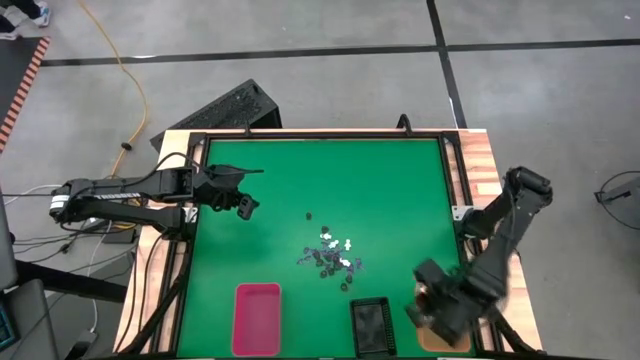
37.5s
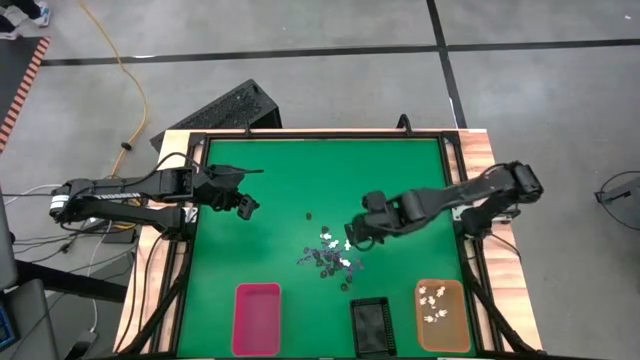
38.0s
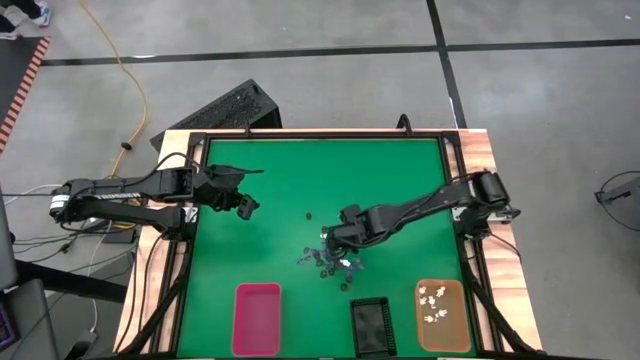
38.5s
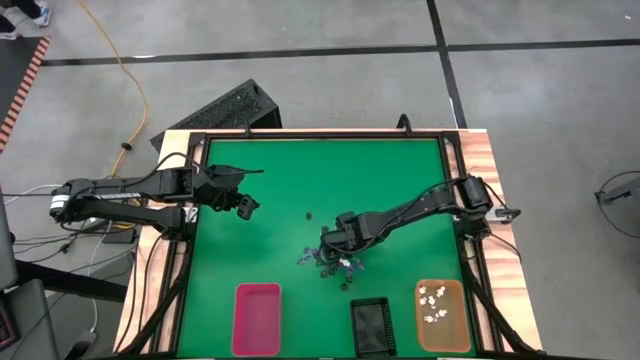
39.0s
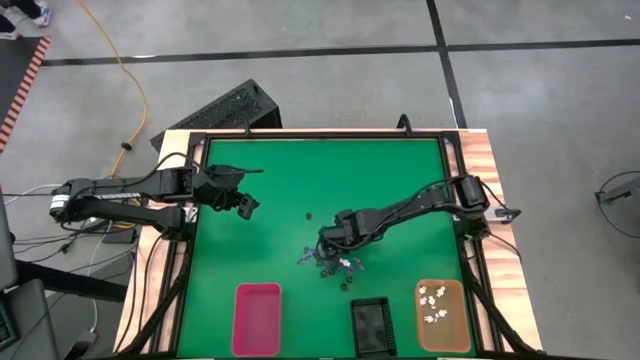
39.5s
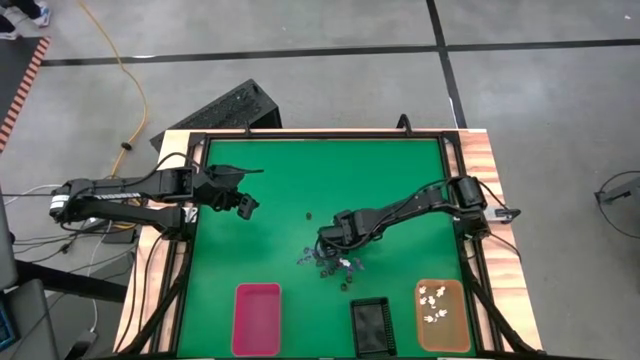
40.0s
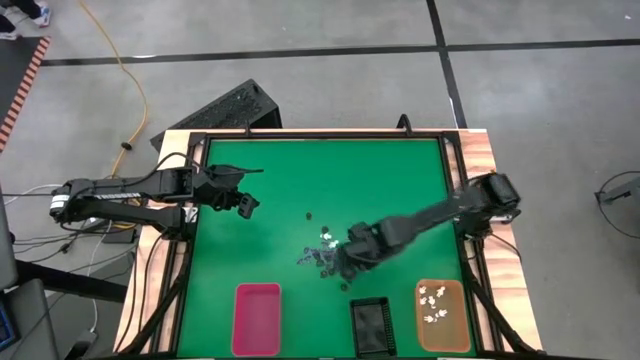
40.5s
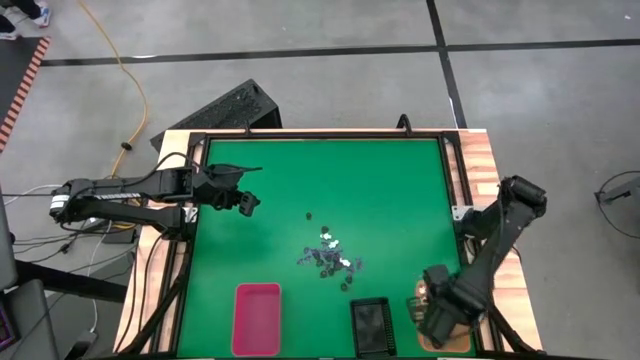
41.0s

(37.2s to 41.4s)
Task: Sort Halloween decoration
Put the white skeleton toy into the right orange organizing bin

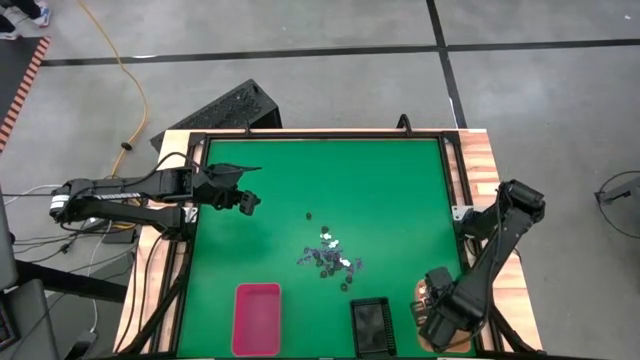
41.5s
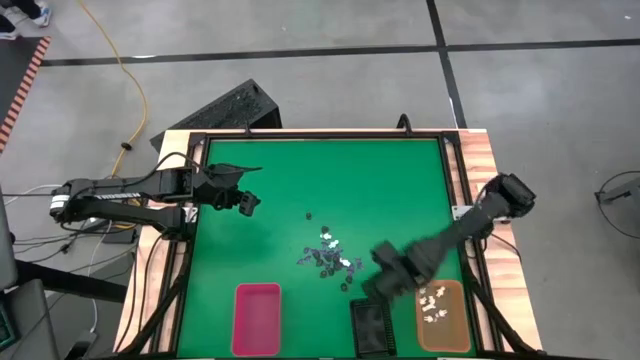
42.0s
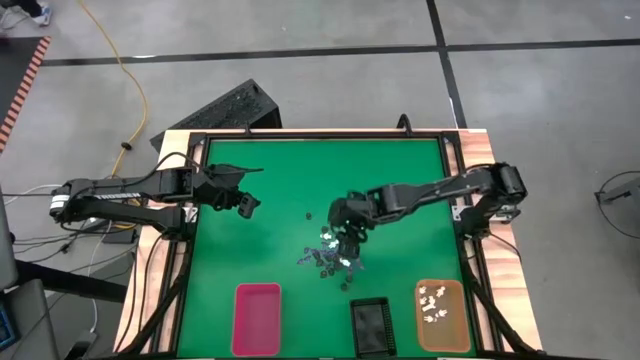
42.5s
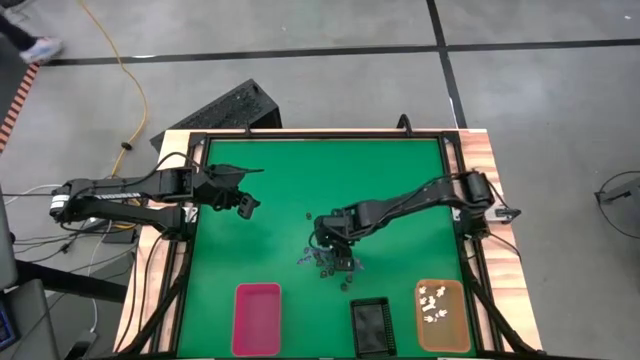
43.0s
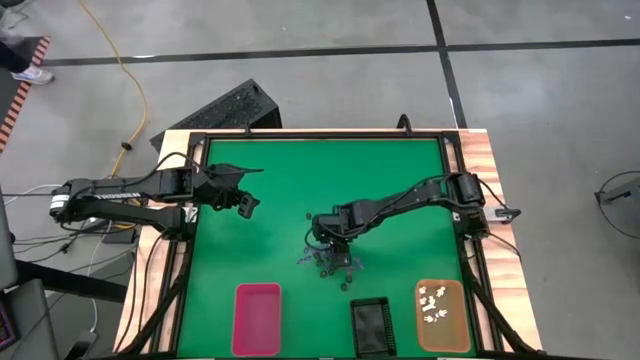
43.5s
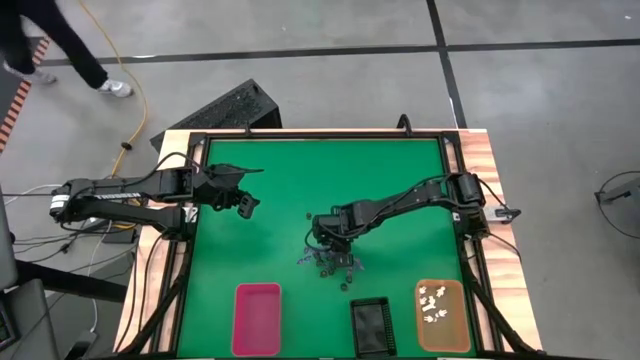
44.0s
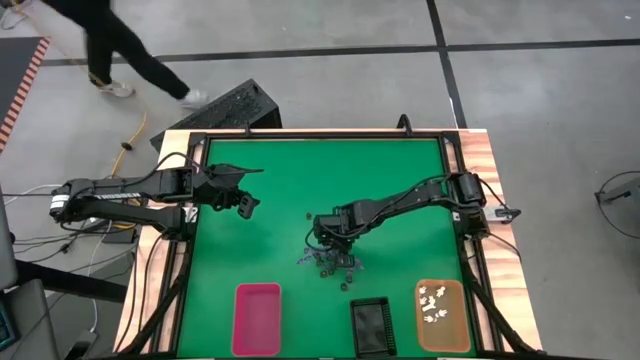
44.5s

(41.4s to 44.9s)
Put the white skeleton toy into the right orange organizing bin

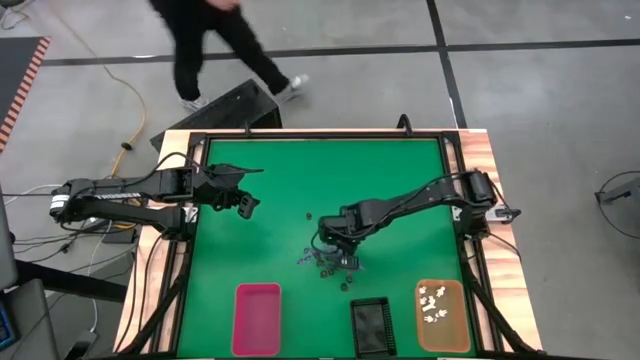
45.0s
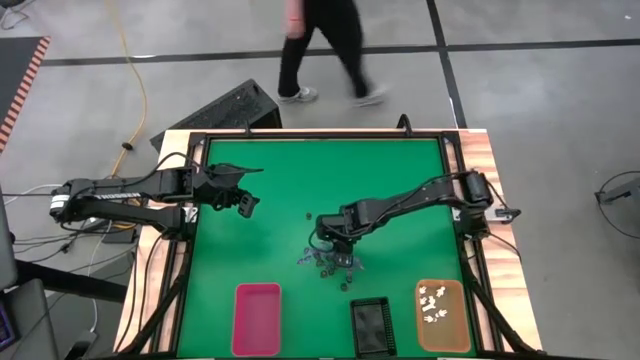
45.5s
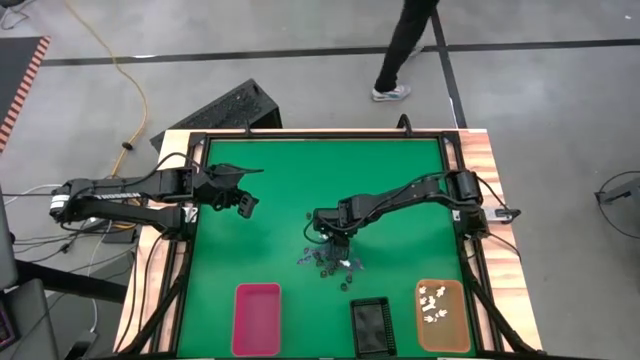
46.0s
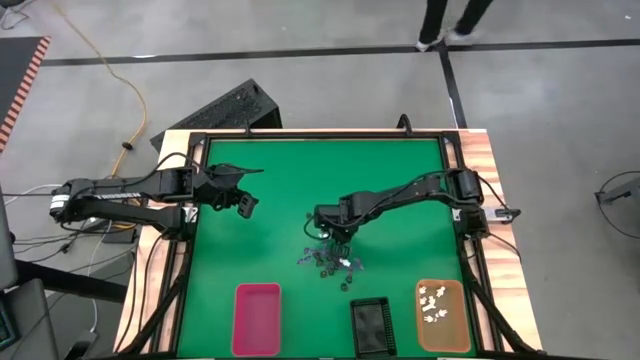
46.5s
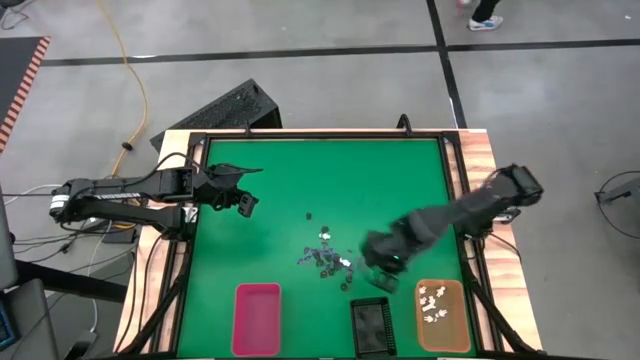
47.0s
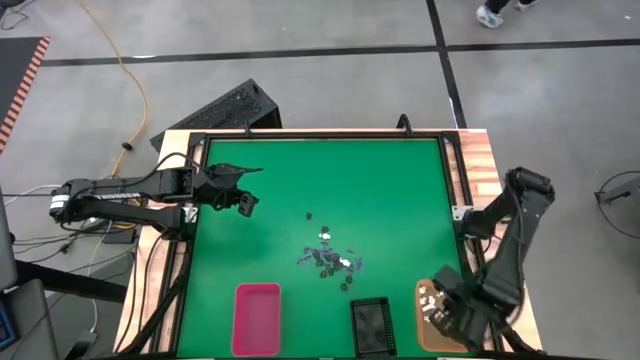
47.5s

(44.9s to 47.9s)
Put the white skeleton toy into the right orange organizing bin

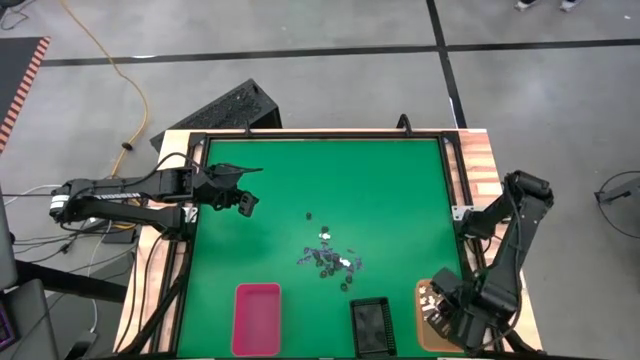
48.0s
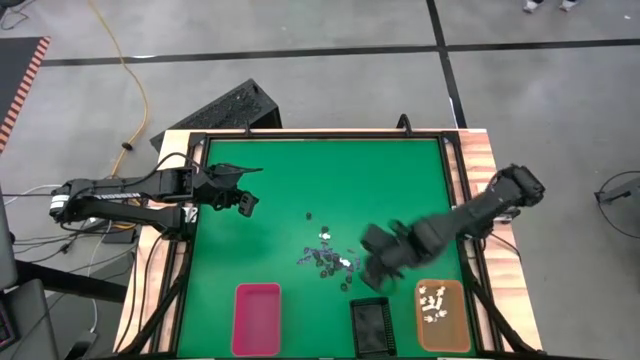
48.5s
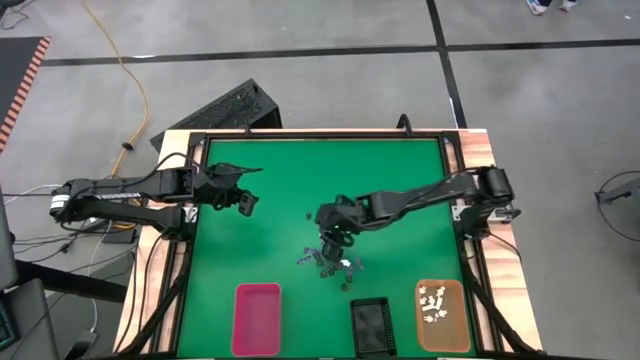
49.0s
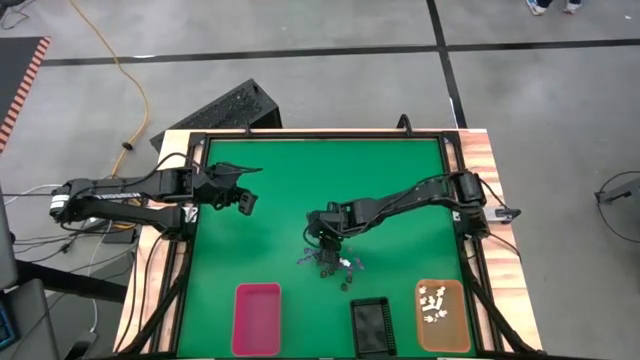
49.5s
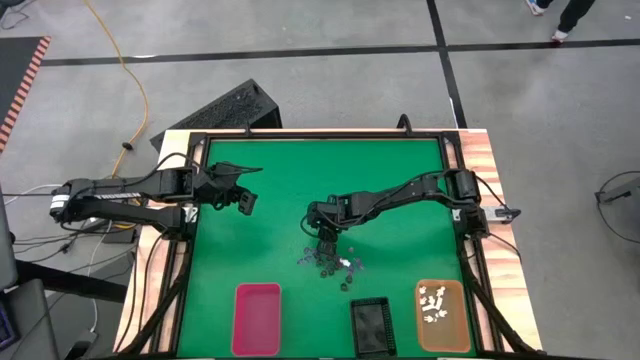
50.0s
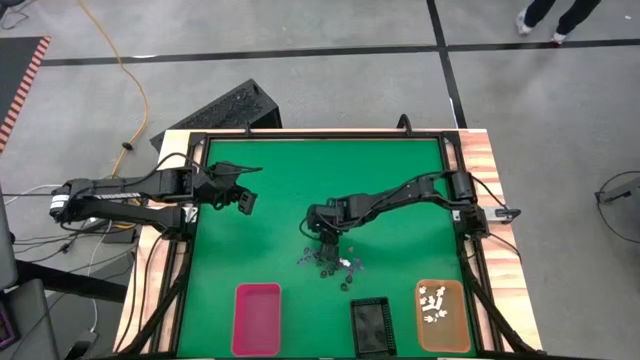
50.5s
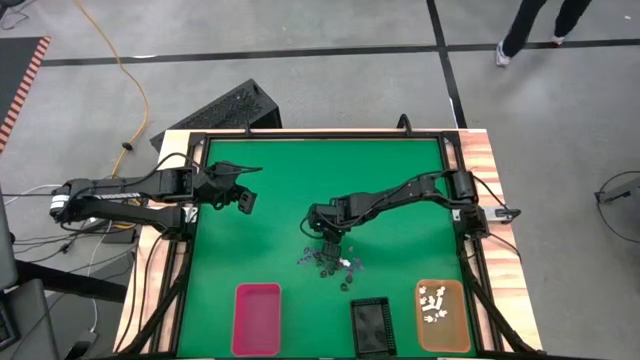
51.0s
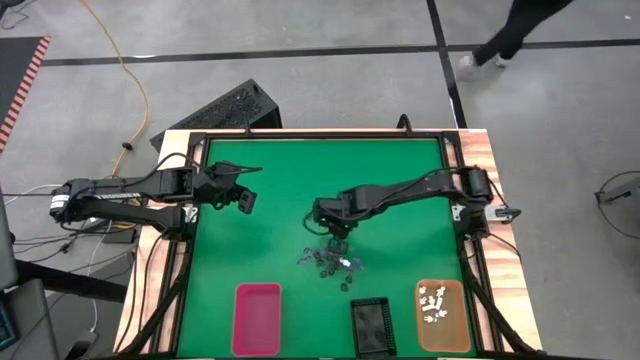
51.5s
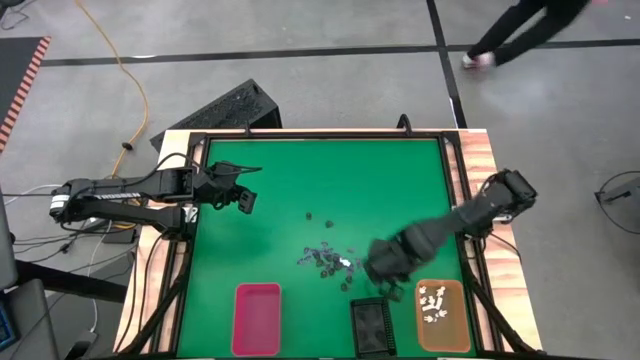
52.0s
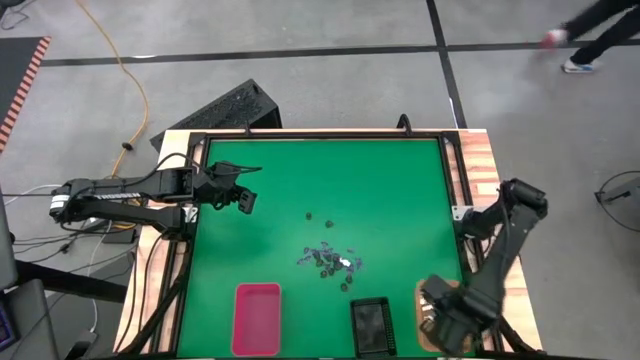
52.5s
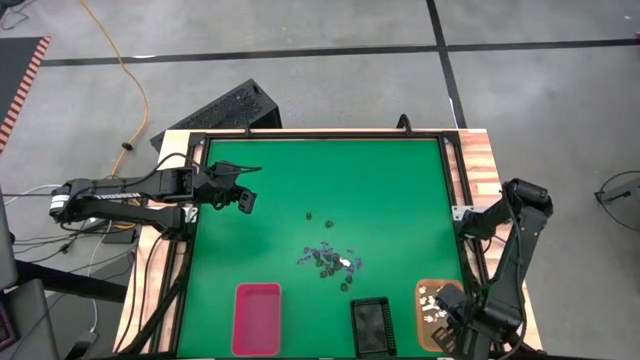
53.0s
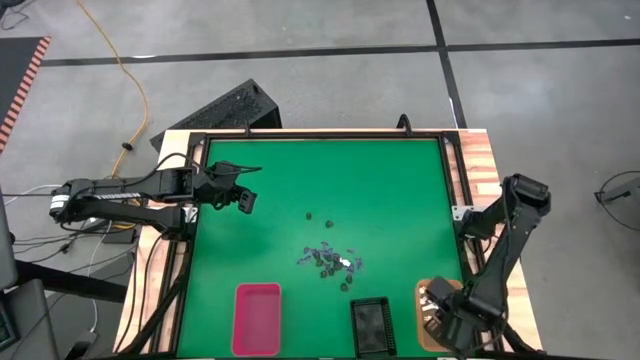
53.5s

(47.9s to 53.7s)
Put the white skeleton toy into the right orange organizing bin

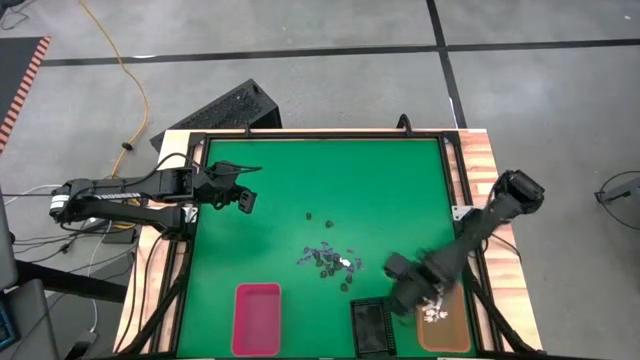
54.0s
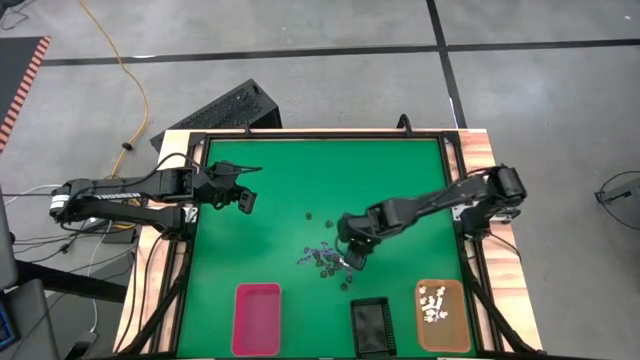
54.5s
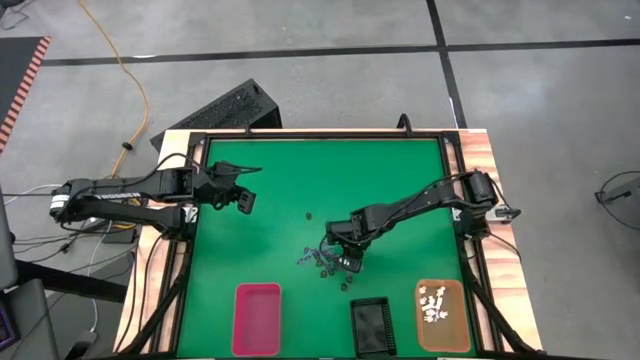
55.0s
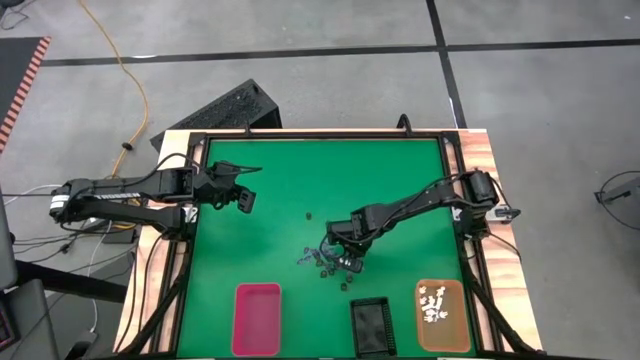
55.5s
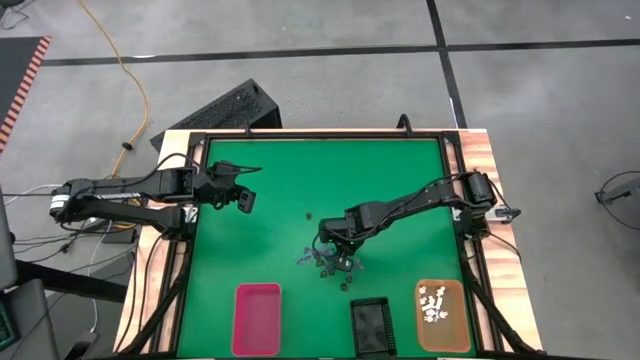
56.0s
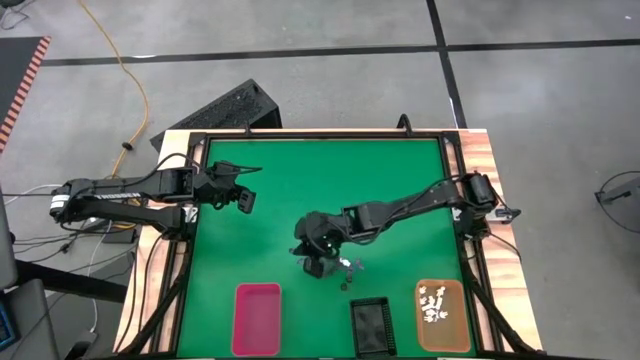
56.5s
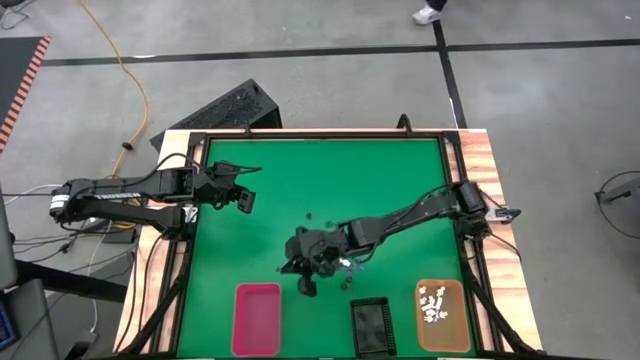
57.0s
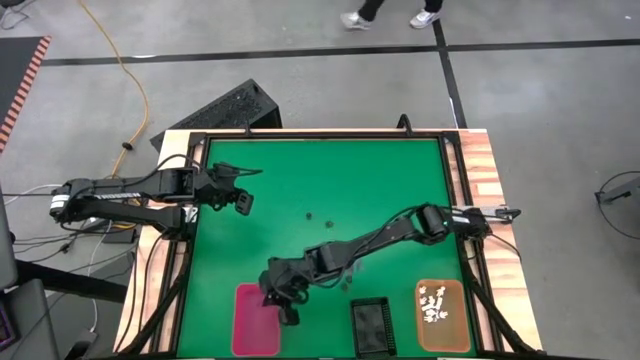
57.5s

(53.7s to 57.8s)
Put the violet witch hat toy into the red organizing bin

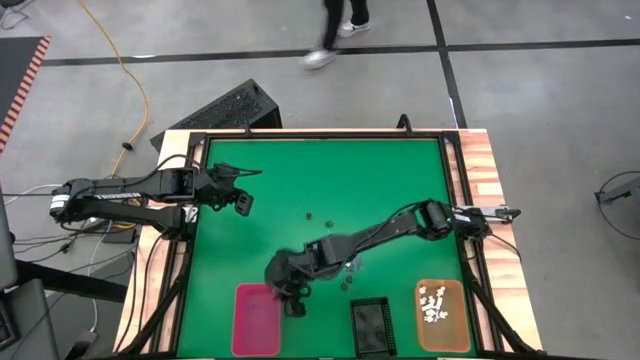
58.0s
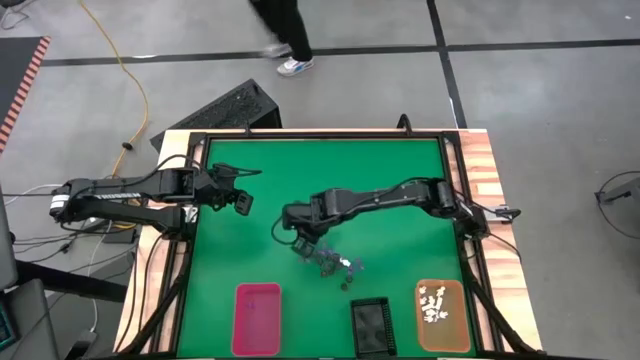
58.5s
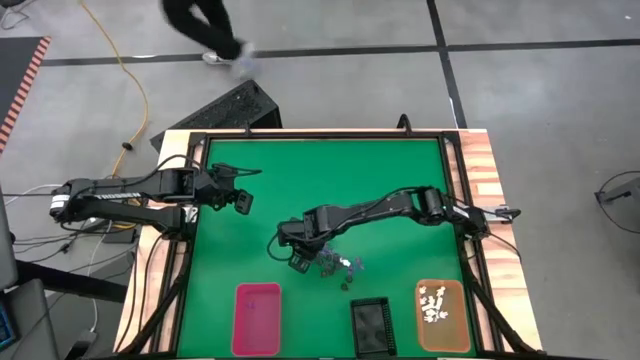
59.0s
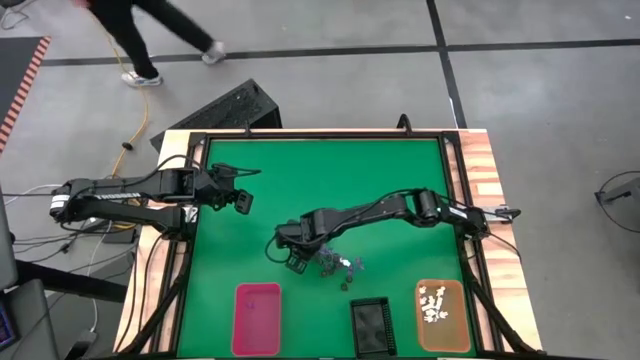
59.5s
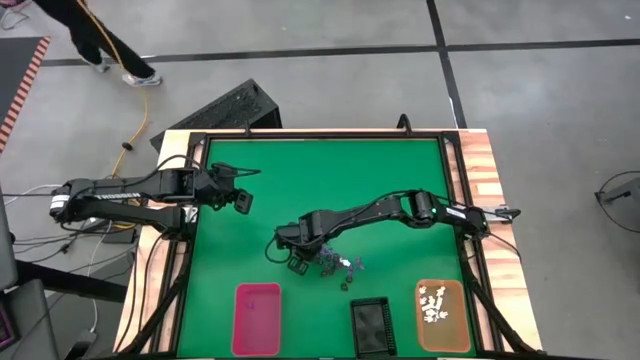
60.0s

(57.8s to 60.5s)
Put the violet witch hat toy into the red organizing bin
